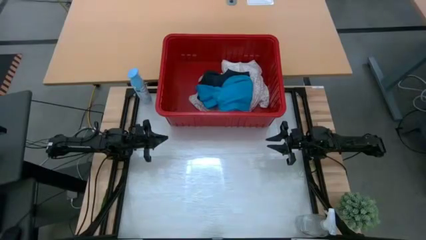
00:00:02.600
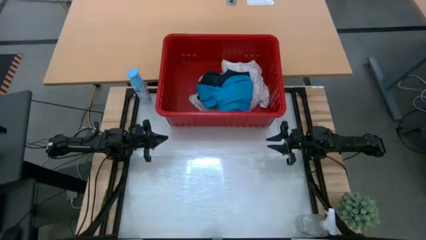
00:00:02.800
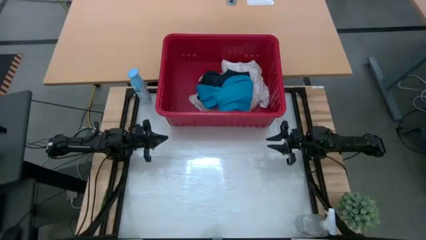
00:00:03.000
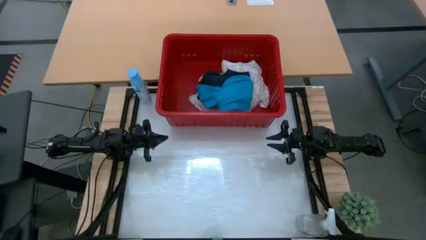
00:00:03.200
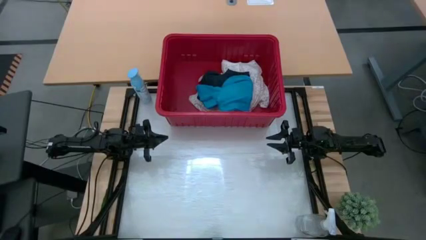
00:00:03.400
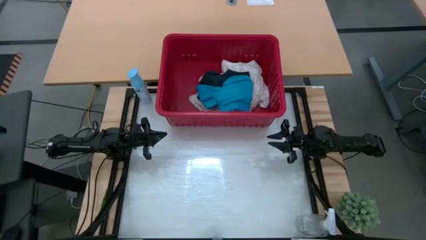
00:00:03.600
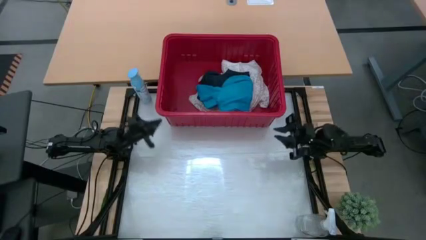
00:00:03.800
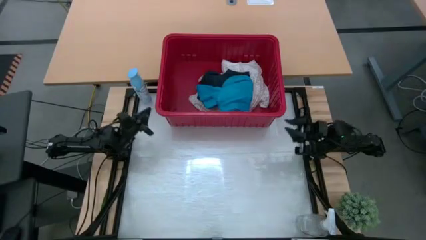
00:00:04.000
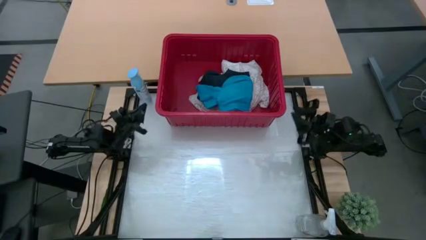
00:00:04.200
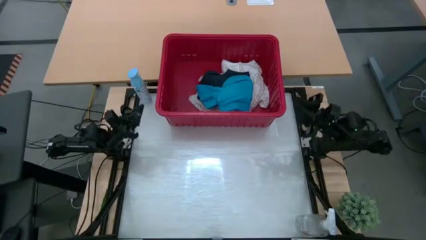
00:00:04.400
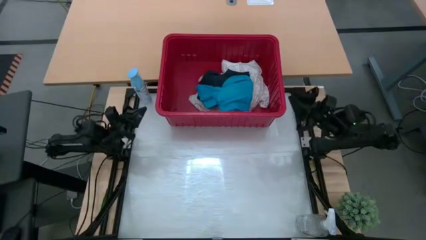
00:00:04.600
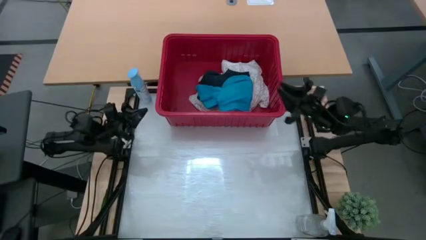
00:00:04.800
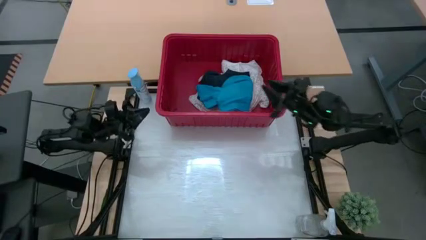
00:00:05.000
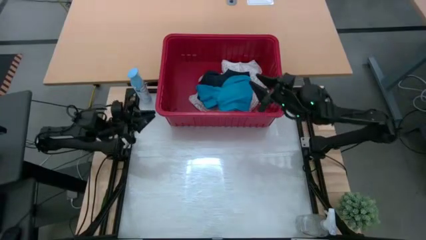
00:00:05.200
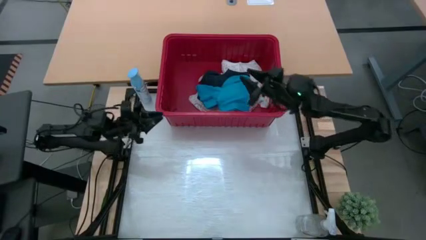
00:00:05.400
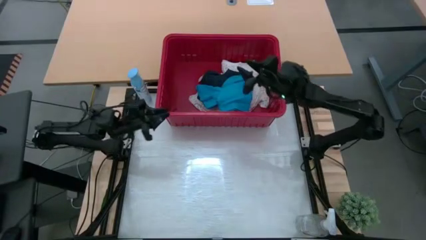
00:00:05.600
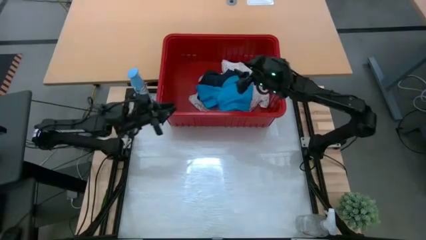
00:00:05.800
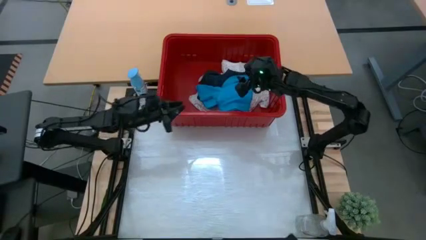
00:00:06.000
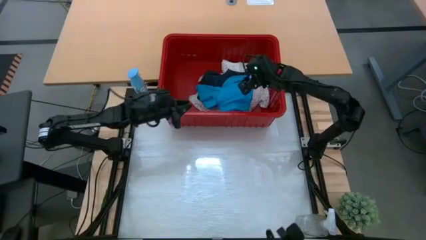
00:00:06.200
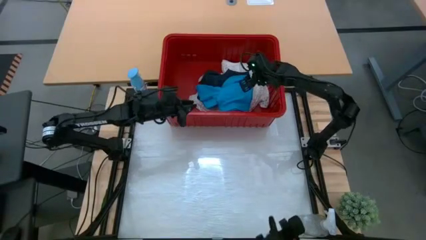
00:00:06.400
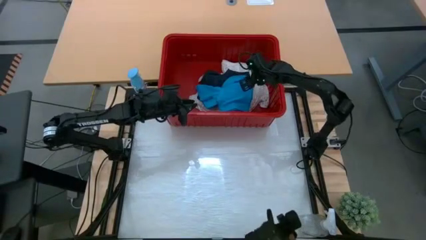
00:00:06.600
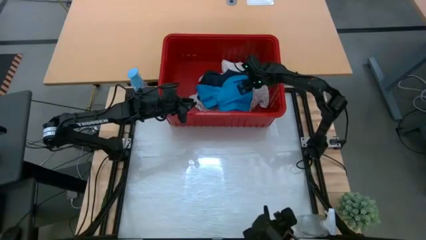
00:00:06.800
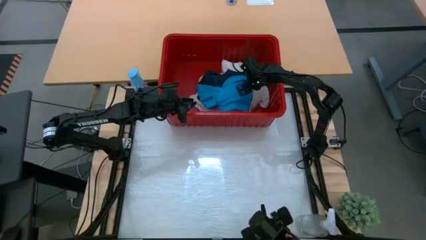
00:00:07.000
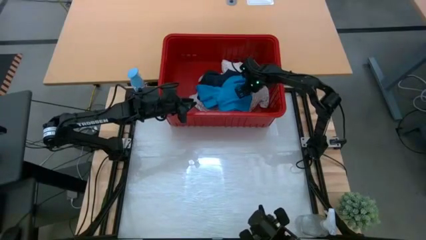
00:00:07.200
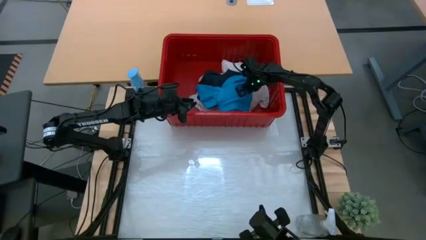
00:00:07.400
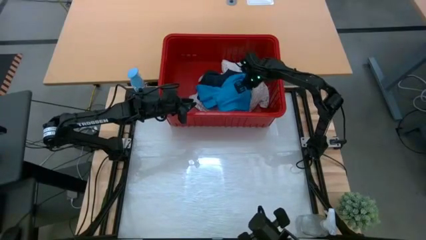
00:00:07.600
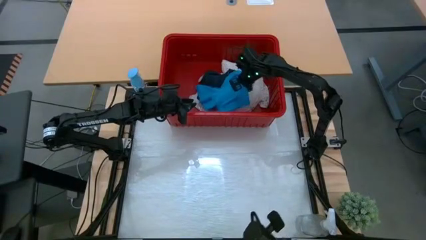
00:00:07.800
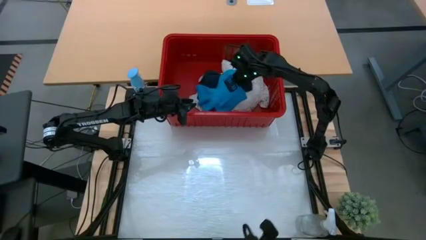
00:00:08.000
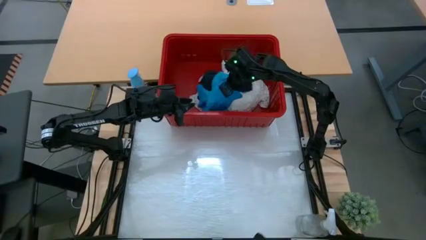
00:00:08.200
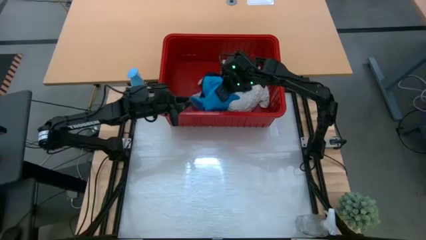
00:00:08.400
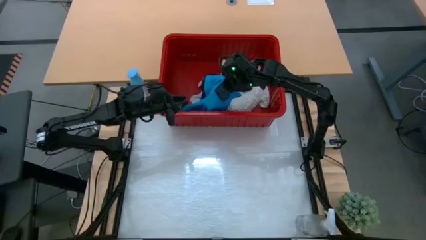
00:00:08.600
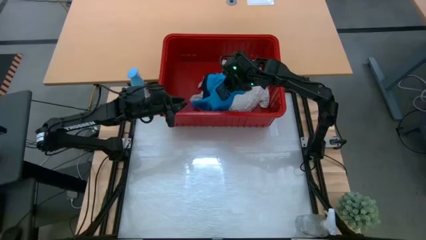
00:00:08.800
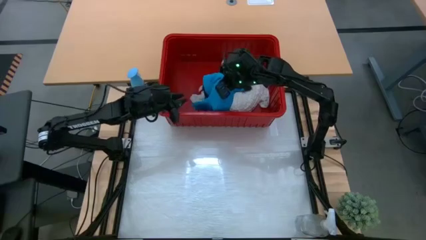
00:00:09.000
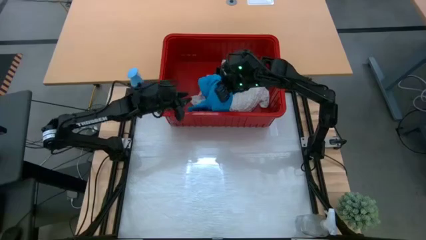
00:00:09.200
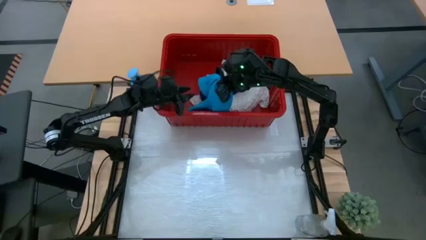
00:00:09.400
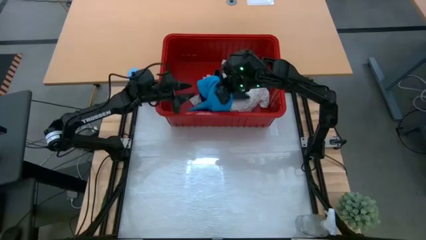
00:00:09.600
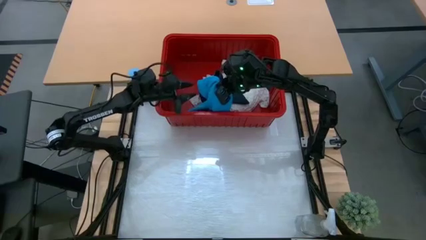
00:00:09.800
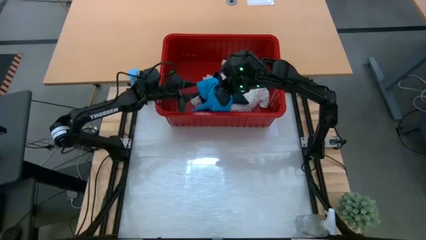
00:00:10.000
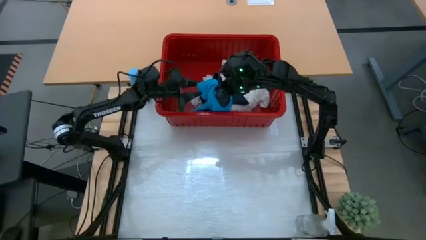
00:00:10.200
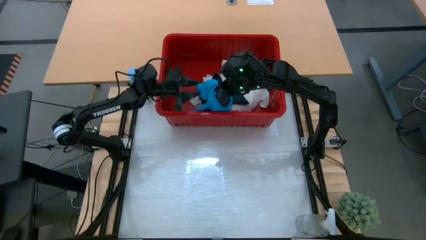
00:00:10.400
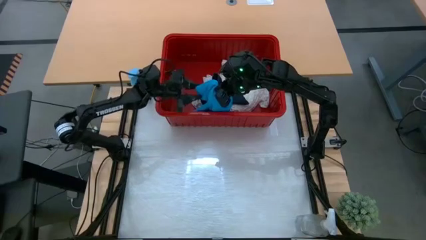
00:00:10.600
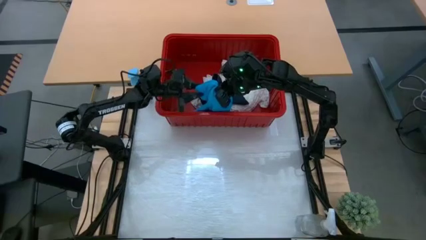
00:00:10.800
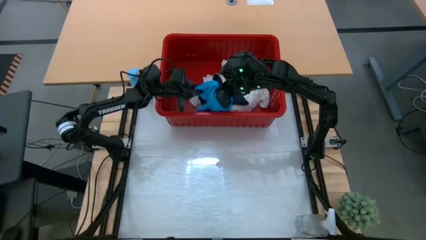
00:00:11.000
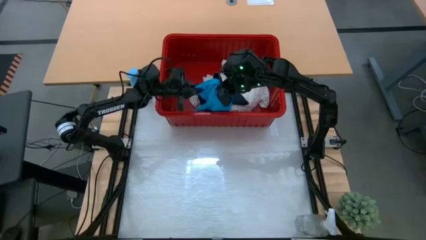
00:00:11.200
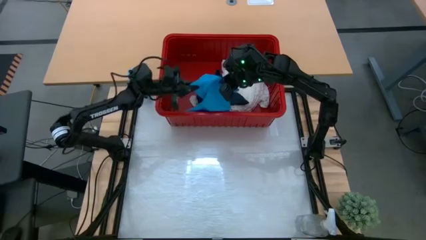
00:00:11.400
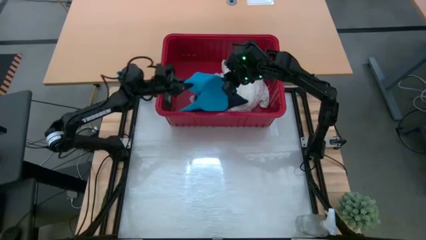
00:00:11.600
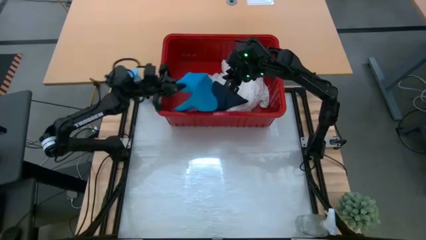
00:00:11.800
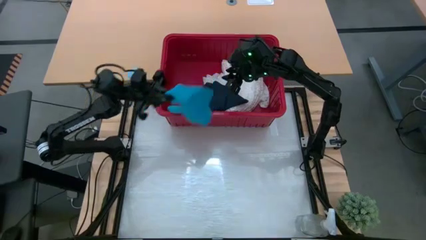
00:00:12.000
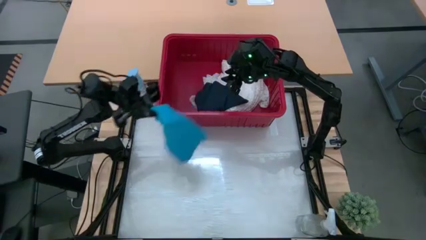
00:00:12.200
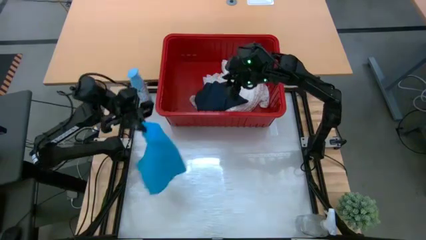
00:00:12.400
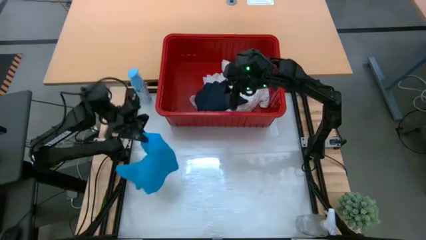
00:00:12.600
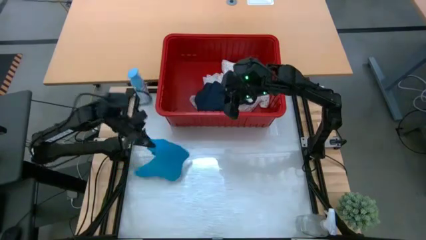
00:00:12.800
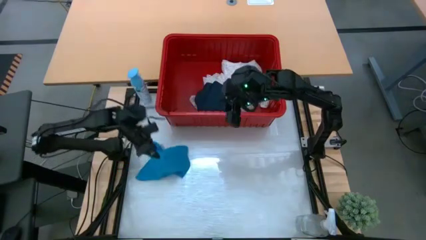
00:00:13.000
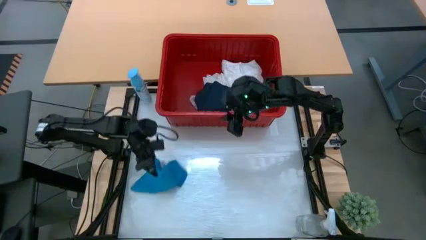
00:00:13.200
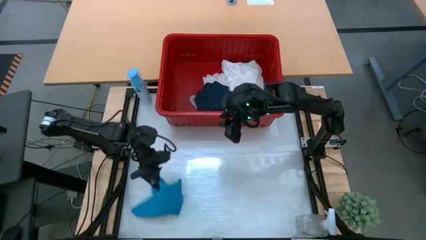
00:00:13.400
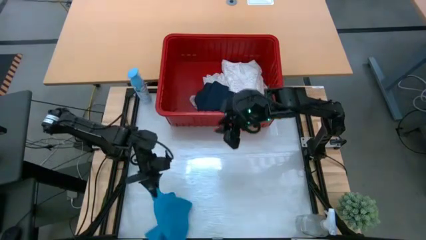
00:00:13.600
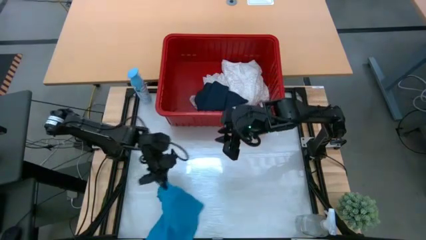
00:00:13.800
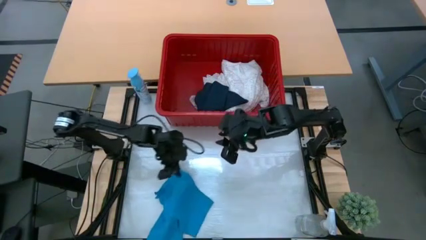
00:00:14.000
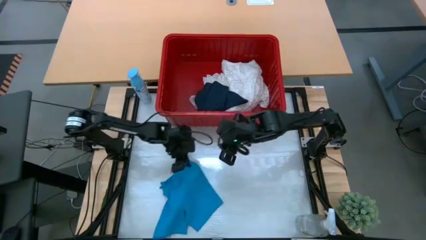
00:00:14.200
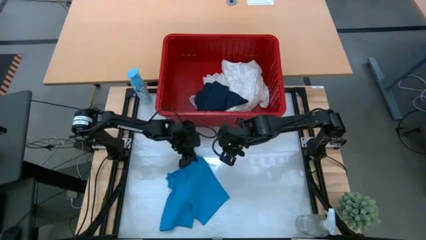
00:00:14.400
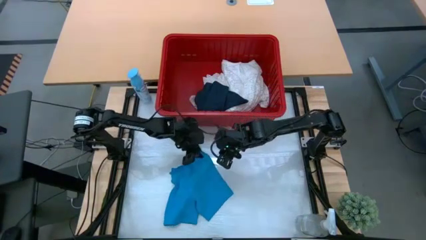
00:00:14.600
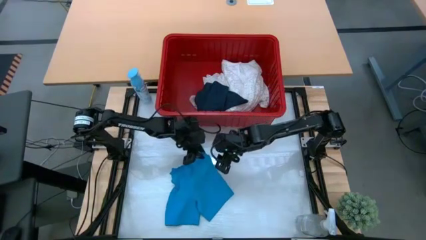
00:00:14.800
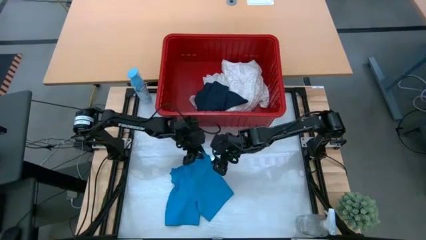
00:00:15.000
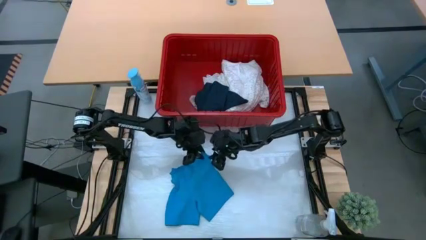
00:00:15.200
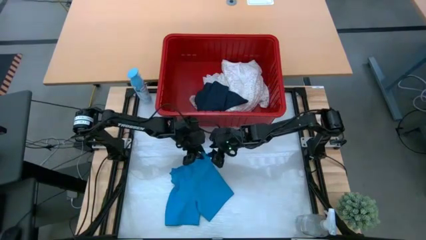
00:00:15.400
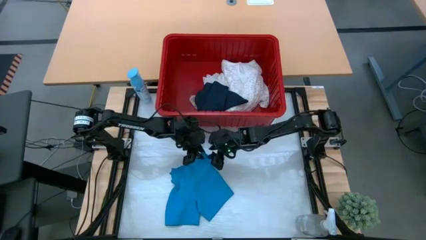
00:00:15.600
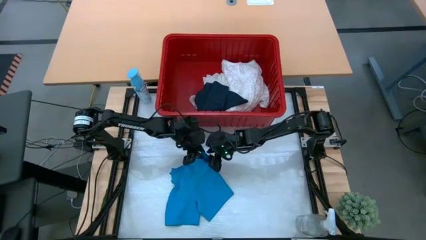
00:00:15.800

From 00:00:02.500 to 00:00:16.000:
Task: Fold laundry
Remove the blue shorts from the red laundry bin
